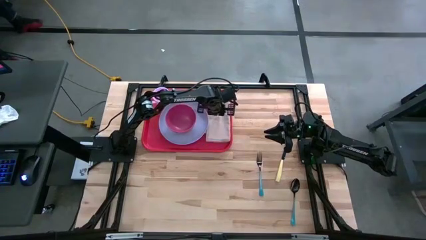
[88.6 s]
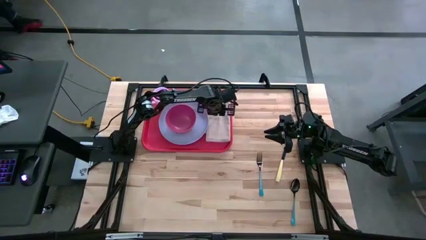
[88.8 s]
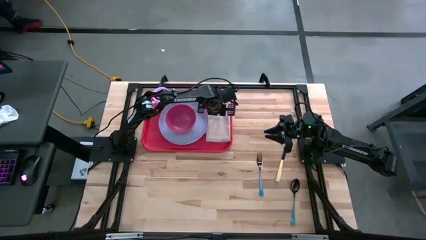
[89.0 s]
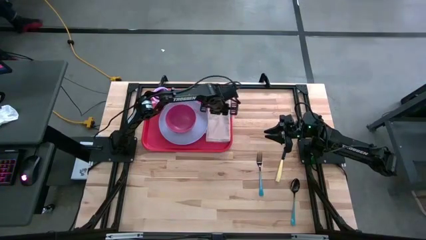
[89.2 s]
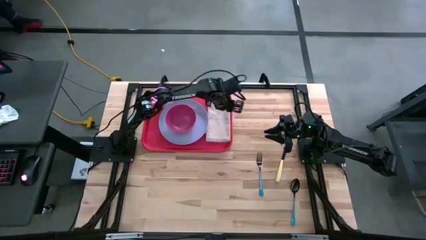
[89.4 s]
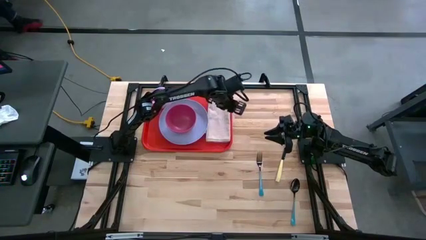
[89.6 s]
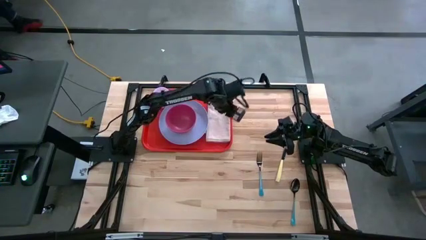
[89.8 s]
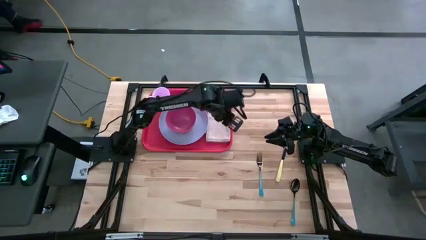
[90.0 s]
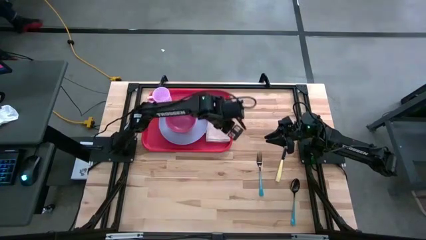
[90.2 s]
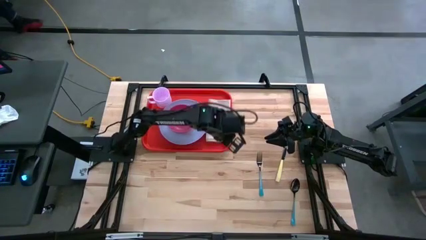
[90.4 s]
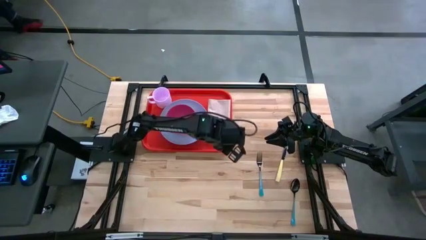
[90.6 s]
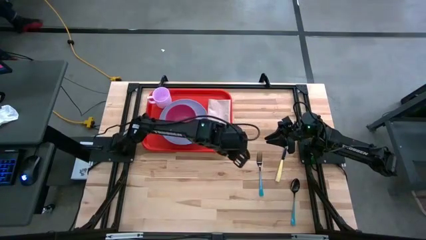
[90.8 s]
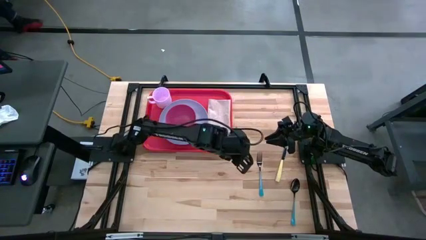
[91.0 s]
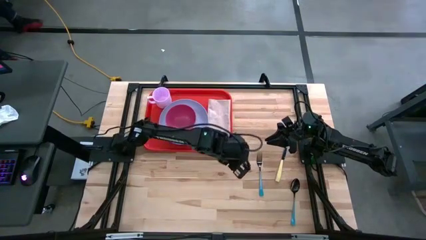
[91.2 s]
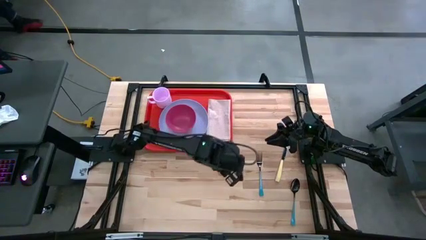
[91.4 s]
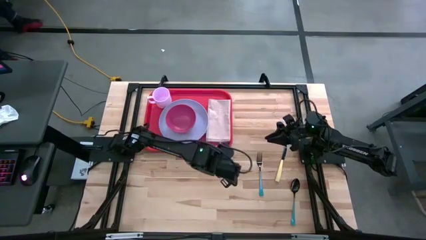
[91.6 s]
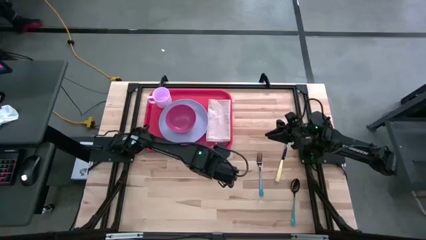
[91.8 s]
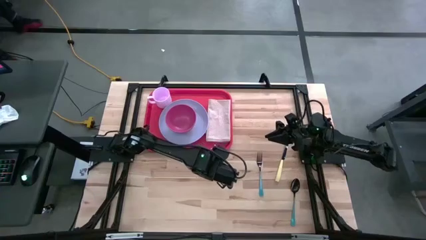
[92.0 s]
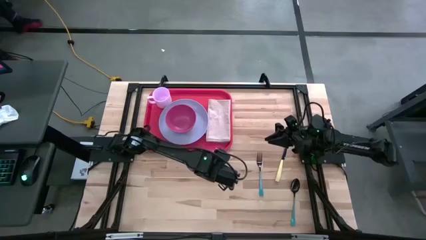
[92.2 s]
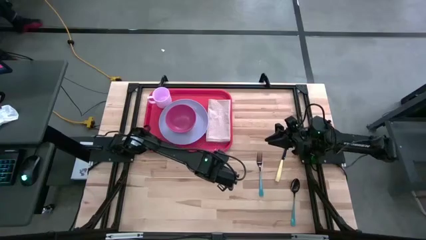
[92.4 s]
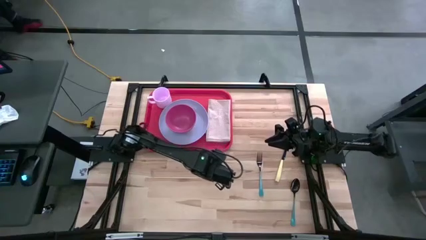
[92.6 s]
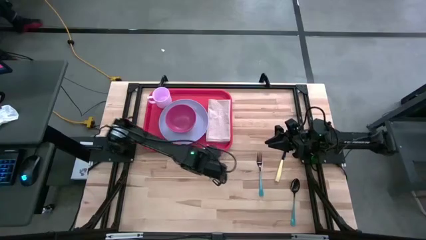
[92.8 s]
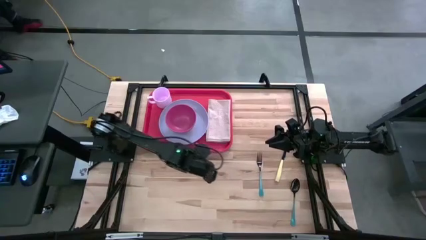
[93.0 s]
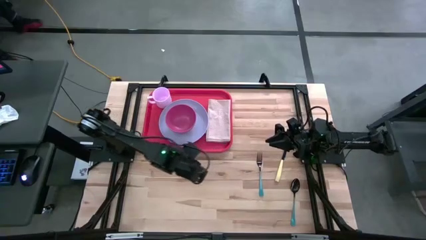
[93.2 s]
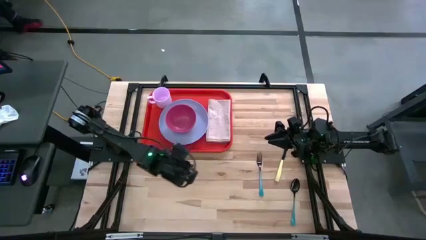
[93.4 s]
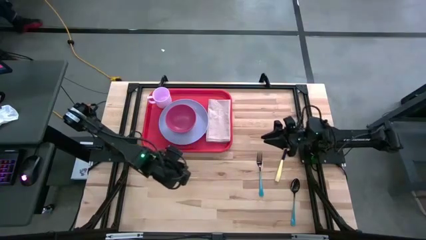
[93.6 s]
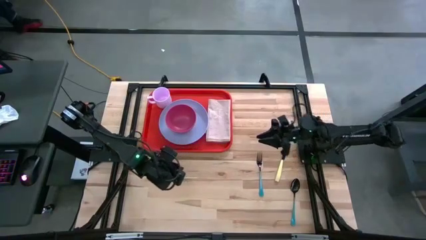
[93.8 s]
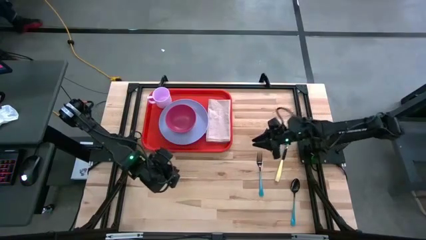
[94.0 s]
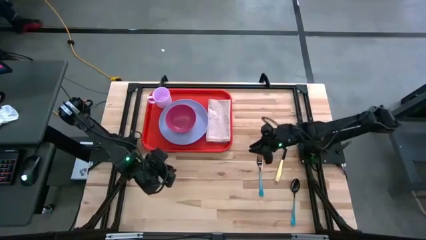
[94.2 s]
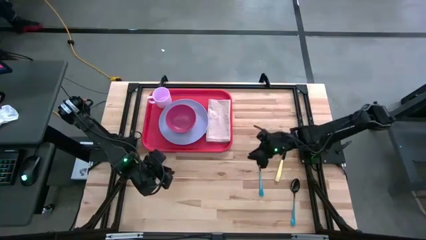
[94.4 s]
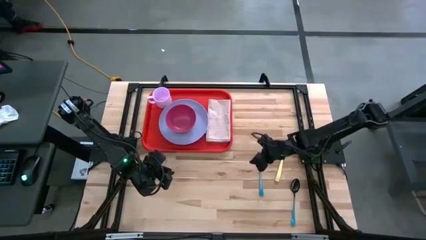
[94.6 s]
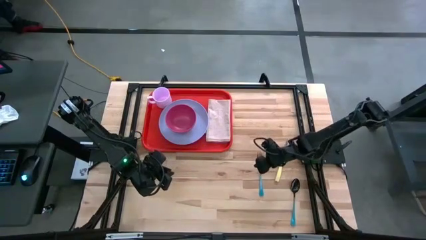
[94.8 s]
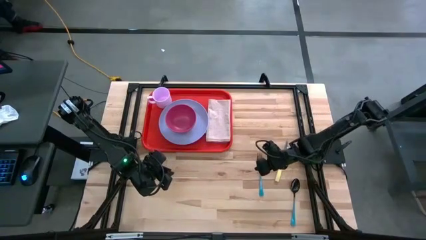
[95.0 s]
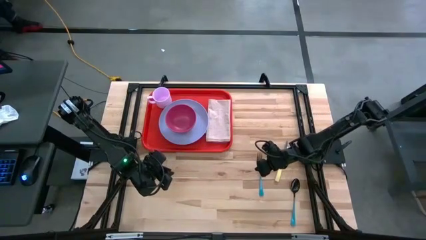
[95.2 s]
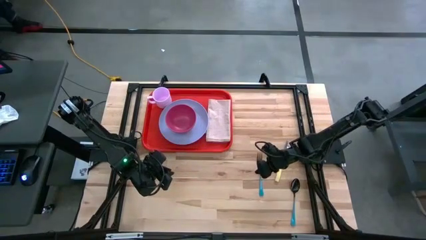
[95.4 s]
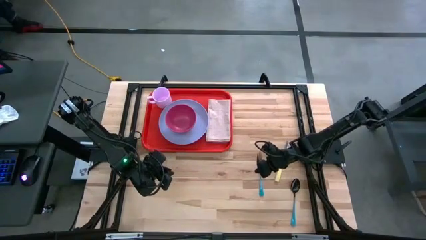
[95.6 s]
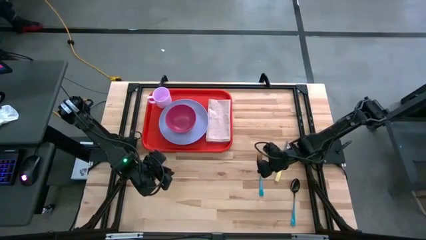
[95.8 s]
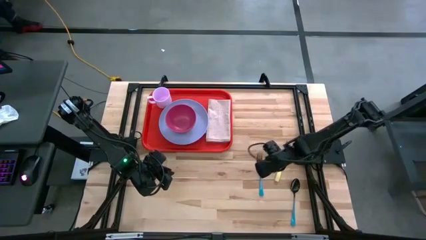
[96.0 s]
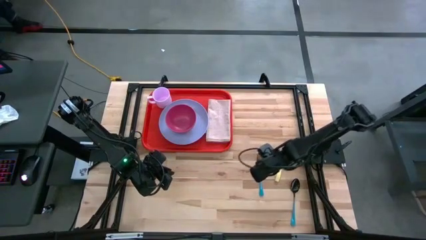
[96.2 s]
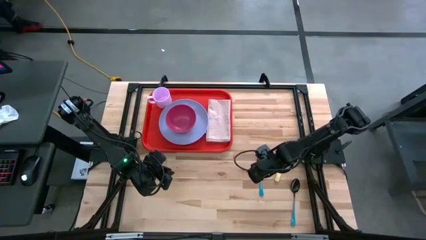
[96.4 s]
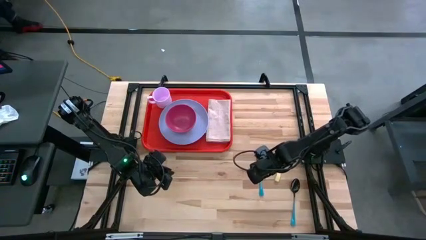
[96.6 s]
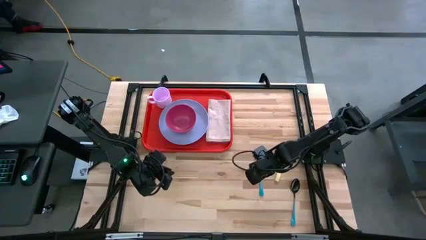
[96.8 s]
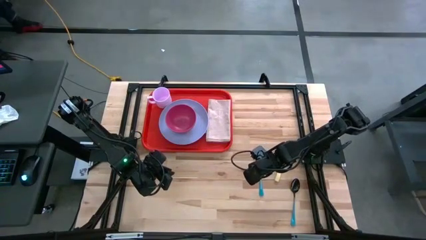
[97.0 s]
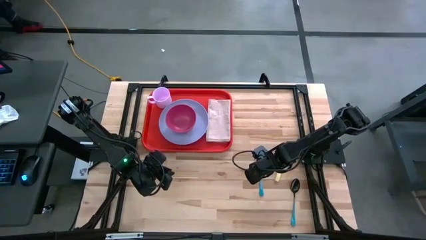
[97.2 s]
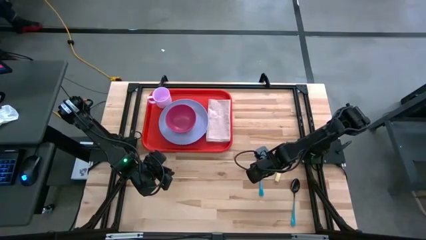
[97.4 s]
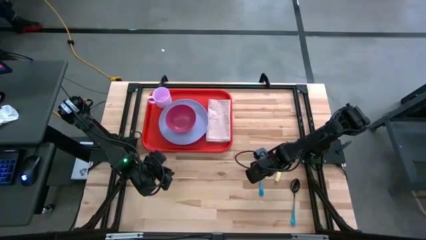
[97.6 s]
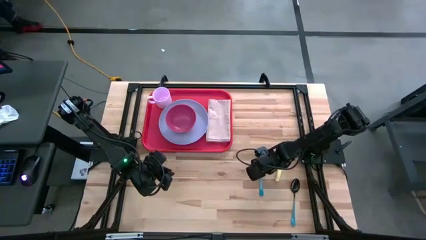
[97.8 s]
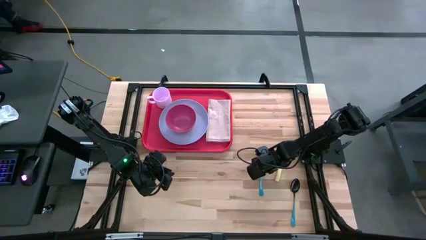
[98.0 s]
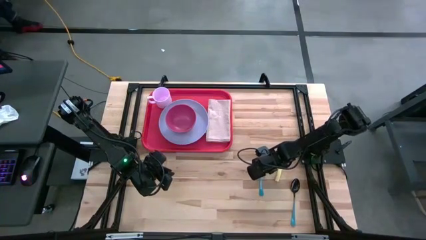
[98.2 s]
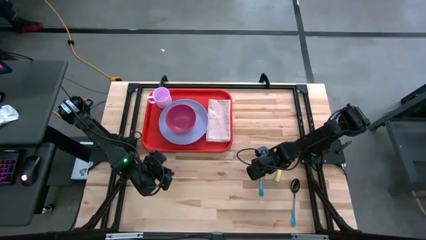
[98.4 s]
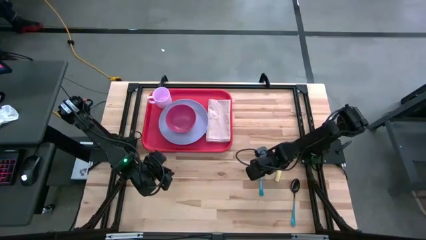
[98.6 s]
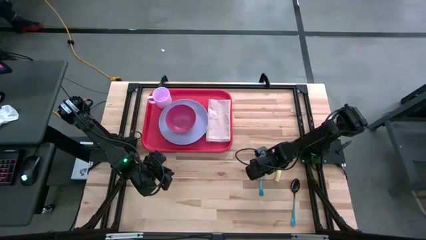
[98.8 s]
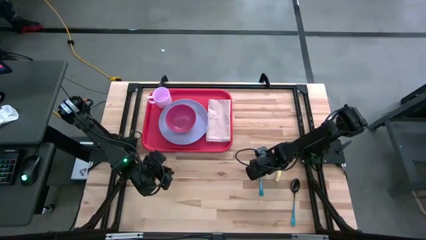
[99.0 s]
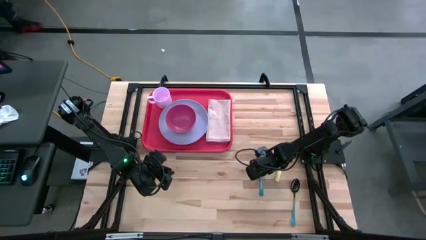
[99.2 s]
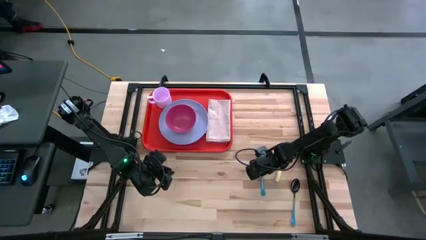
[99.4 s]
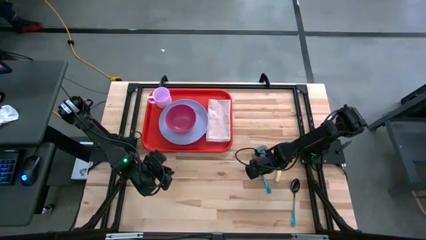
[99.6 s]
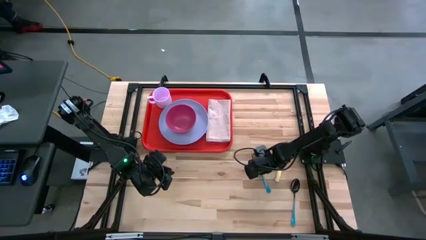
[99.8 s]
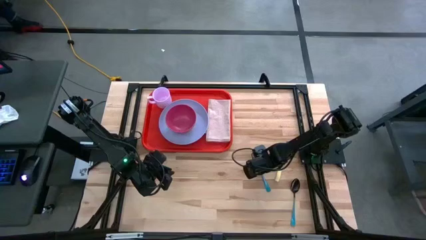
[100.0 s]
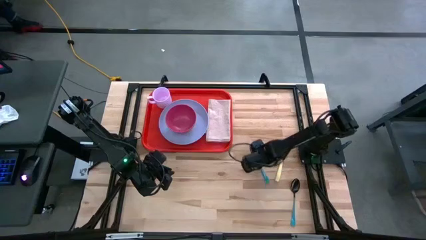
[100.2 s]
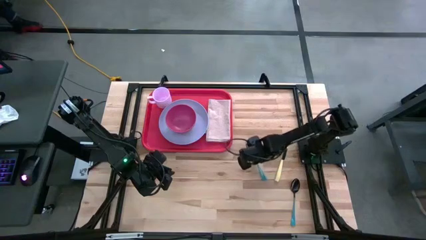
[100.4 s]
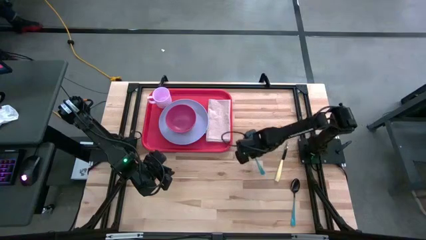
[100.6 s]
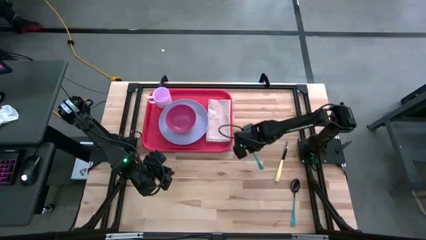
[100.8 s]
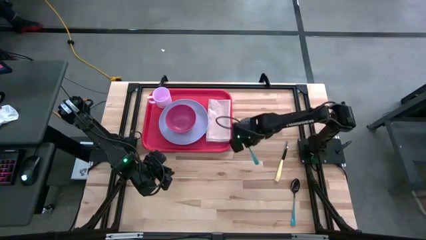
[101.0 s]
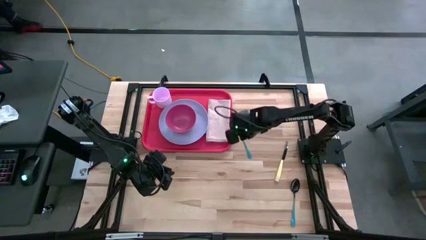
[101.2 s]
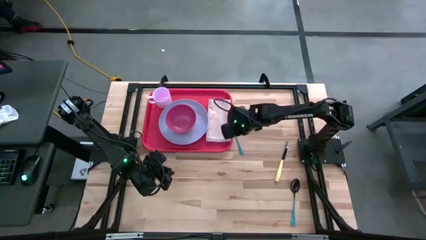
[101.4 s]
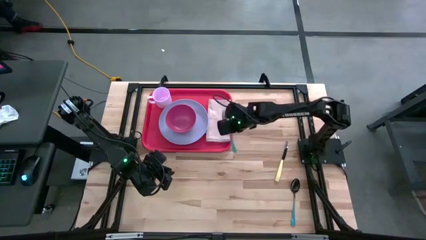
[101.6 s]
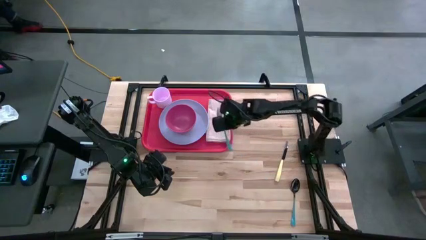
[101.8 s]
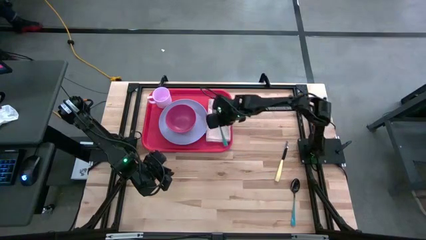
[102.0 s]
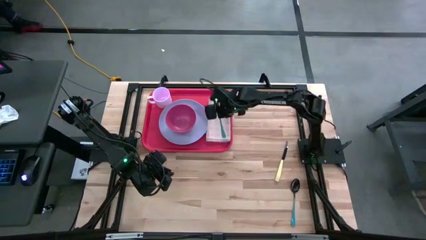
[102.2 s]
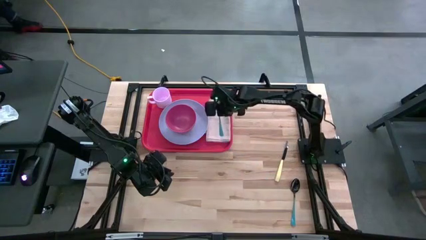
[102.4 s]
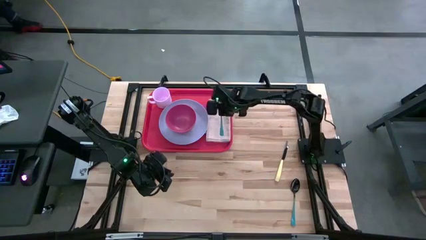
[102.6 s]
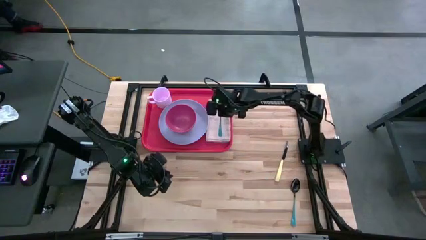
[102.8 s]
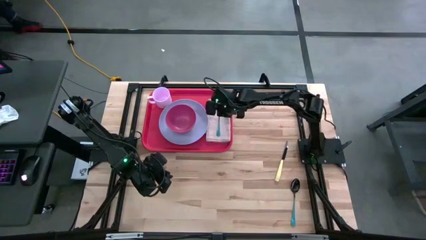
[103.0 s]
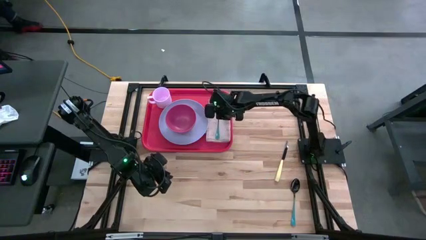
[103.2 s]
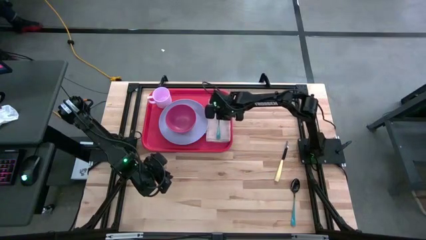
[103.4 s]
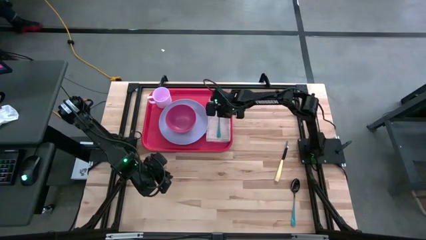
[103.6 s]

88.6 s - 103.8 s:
Task: Set up tray
Put the blue fork on the brown napkin on the red tray

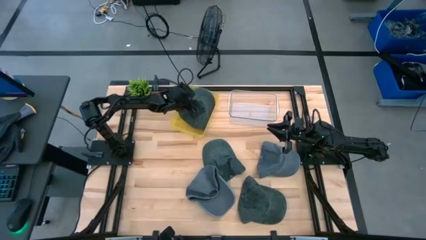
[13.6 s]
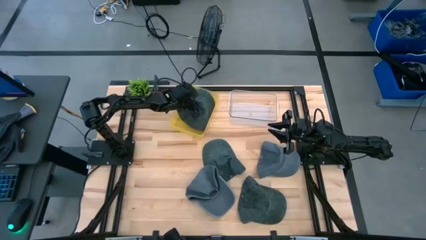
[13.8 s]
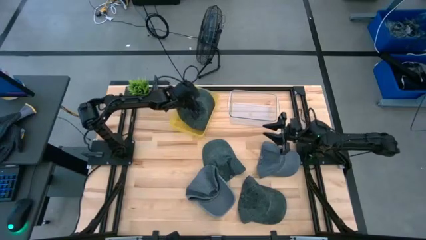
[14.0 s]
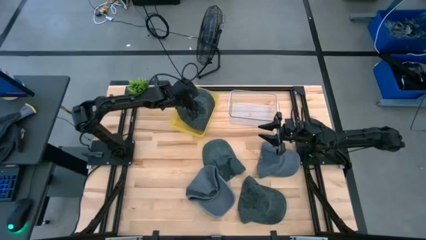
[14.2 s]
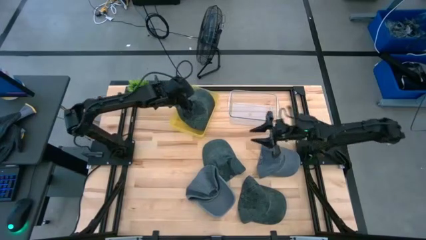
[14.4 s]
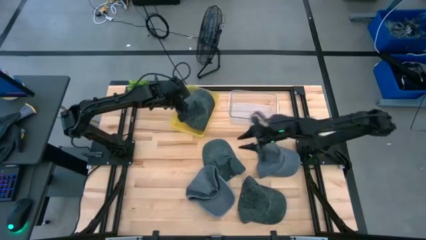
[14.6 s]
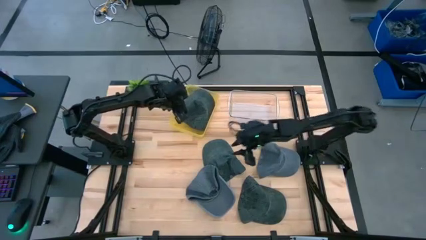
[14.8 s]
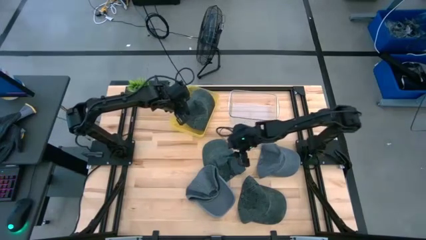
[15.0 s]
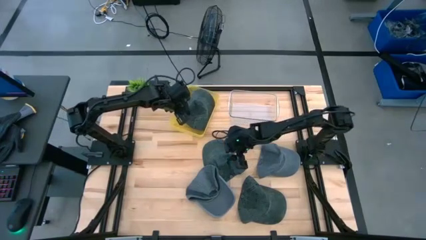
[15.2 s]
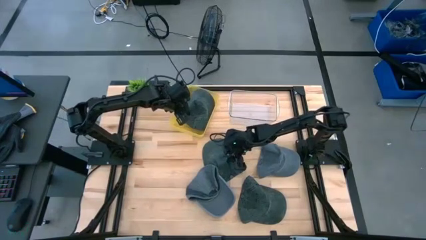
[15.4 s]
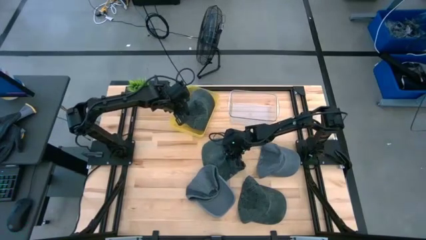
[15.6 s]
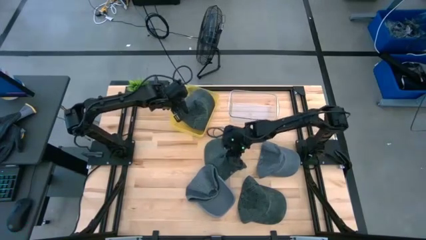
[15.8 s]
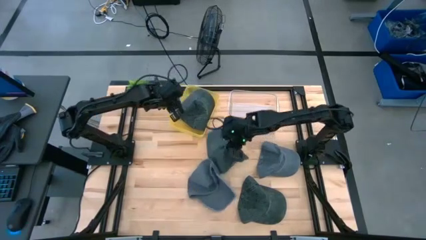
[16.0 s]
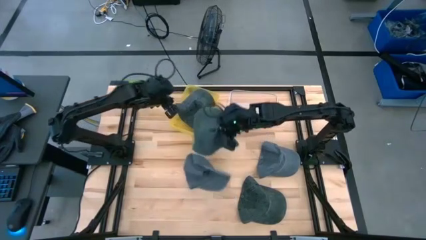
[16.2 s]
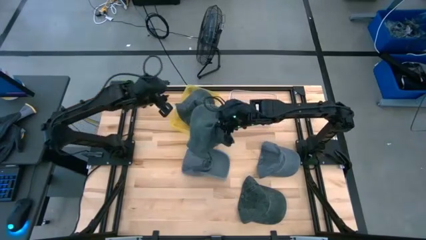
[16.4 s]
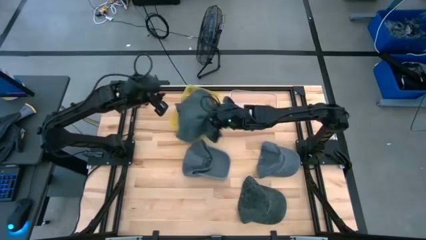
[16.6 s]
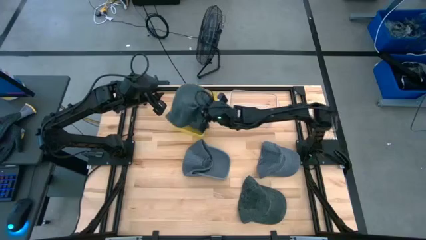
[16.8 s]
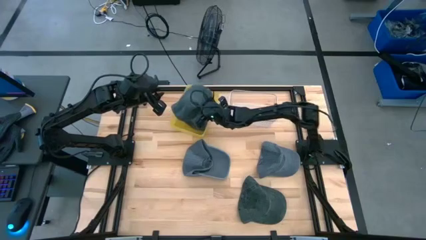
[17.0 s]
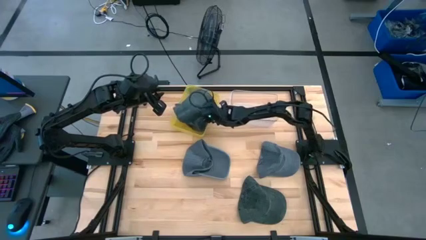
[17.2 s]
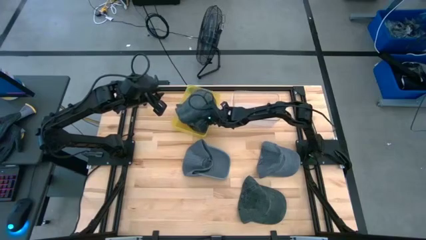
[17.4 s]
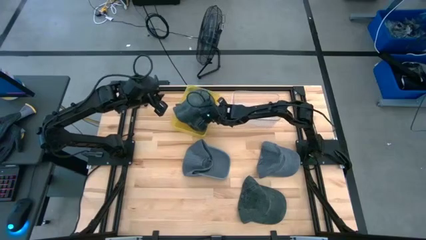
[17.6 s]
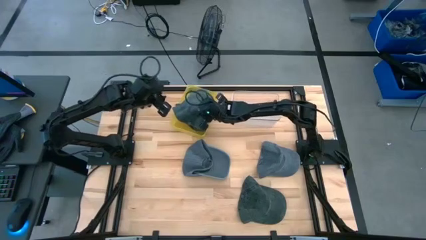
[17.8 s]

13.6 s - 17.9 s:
Task: Pick & Place hat
Put the top gray cap into the yellow bin
